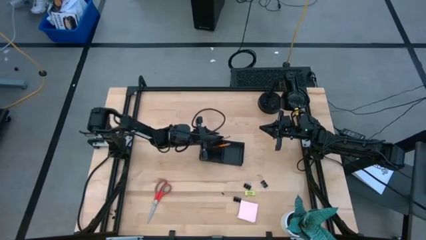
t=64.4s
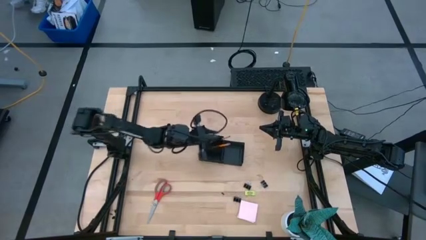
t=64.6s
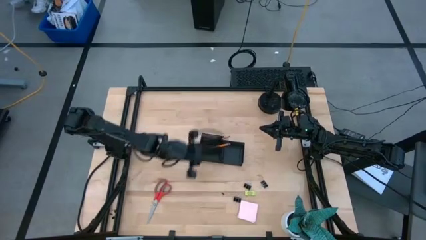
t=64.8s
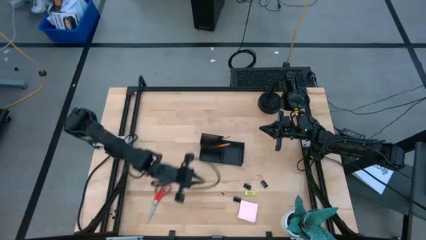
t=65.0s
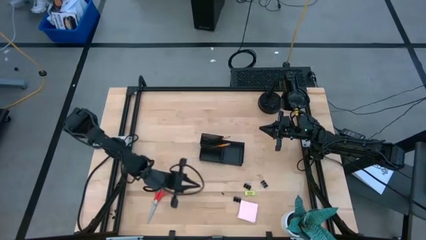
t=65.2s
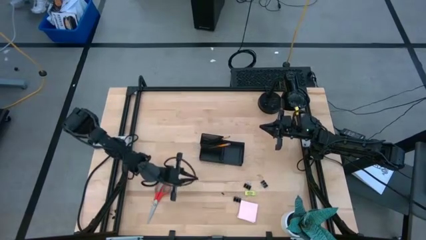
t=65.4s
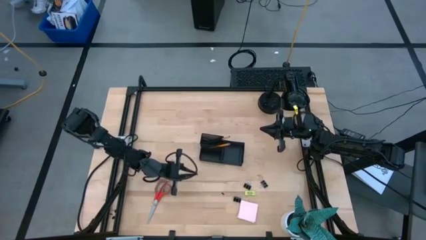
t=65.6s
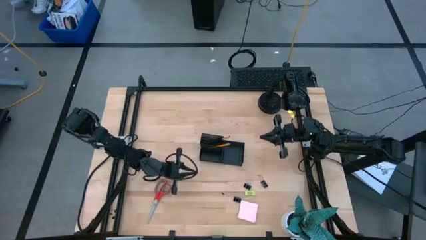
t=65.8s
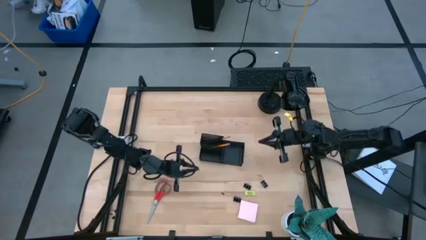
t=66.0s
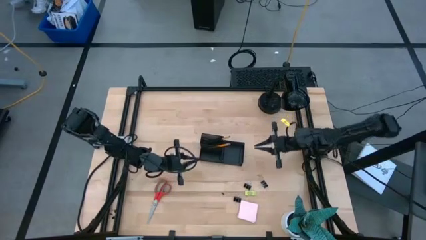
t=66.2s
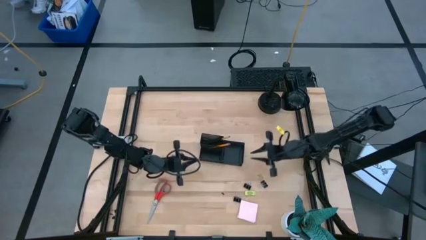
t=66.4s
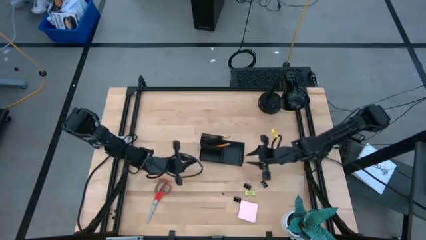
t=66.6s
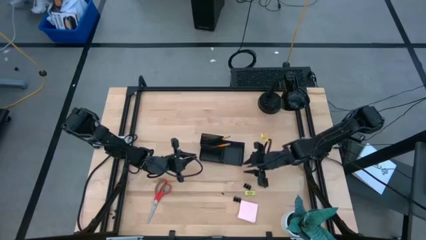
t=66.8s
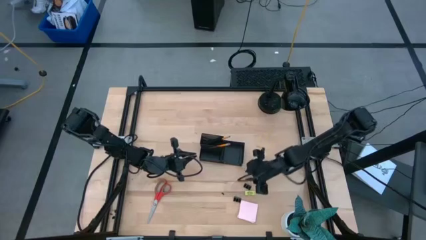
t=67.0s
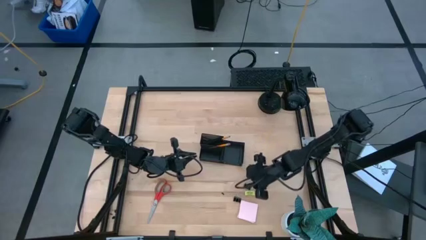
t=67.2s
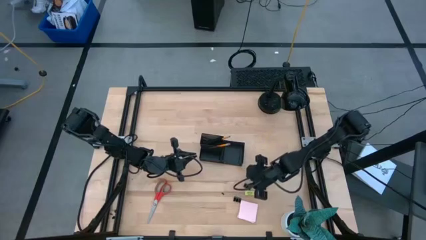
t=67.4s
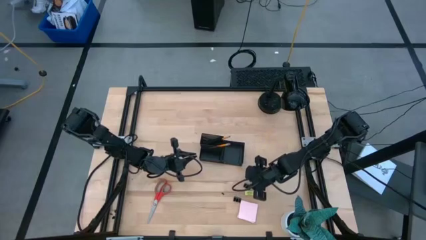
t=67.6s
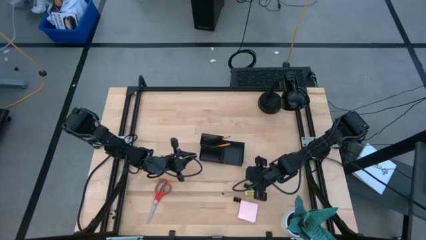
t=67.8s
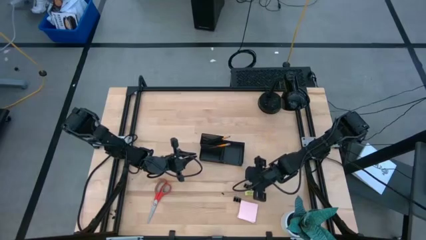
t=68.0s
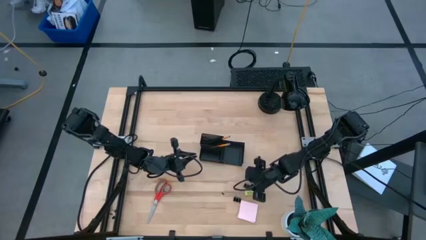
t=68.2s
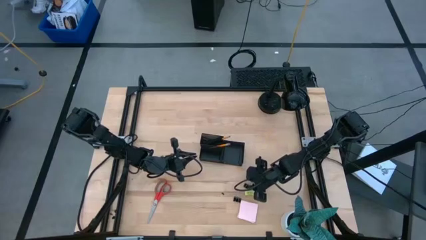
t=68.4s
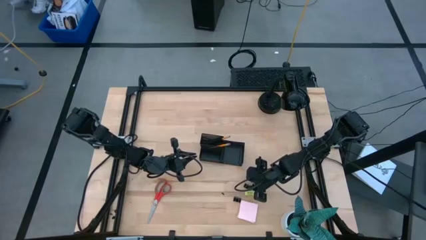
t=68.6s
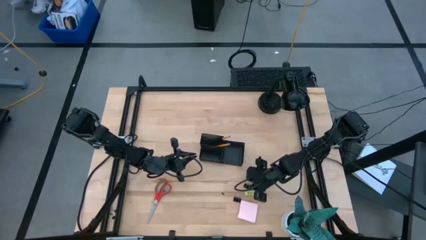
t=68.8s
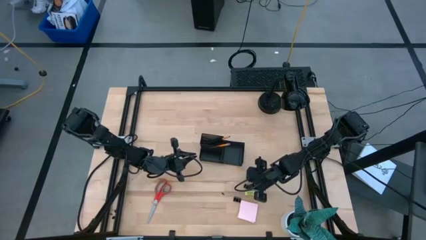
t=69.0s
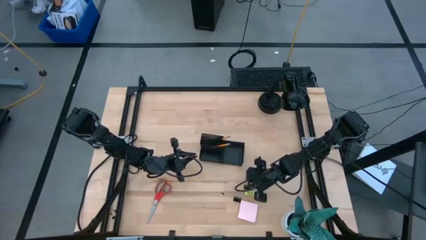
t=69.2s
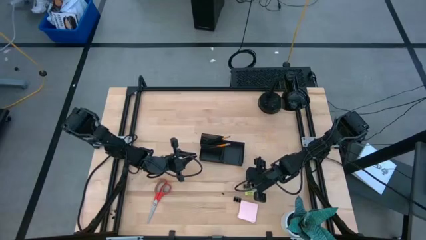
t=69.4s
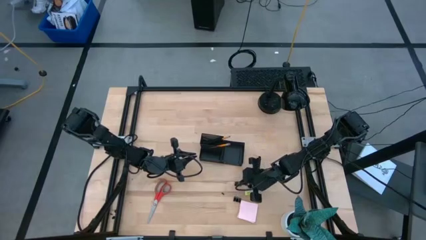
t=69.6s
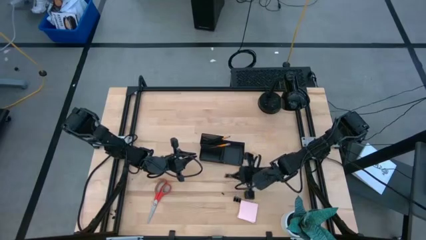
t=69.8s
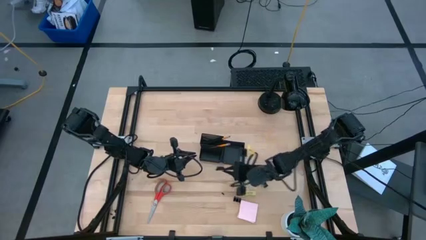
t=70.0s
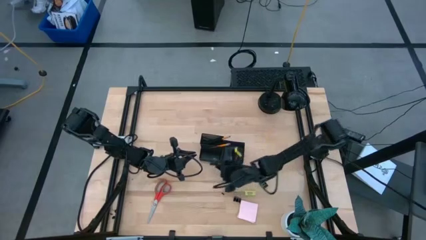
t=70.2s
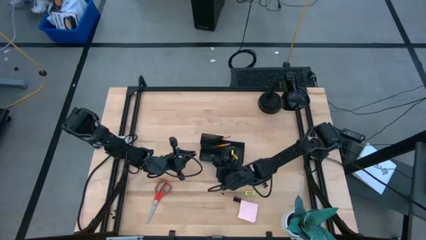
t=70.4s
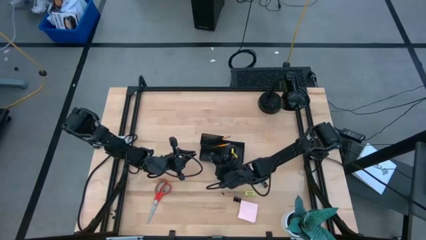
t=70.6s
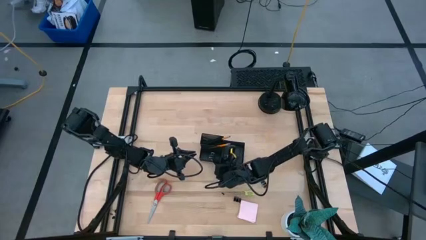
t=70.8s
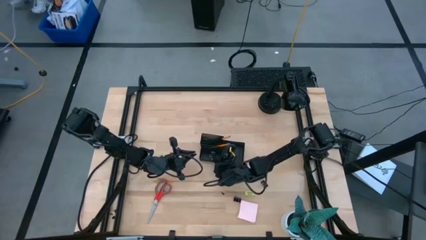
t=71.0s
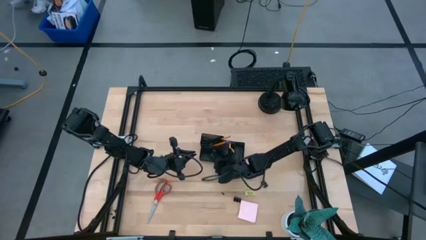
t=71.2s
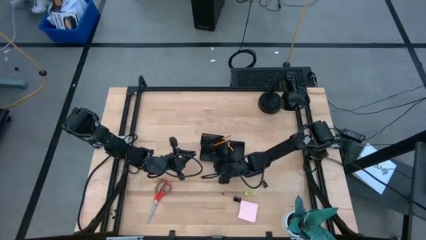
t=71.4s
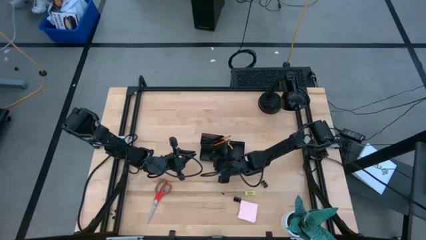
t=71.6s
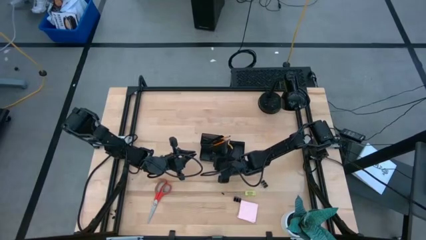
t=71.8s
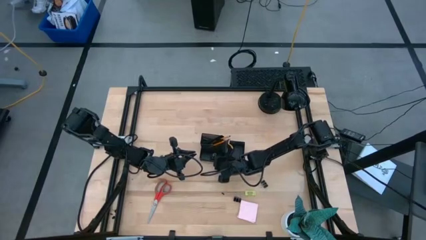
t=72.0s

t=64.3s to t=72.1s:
Task: Pick and place office supplies into organizer
Put the middle binder clip into the bottom left section of the desk organizer

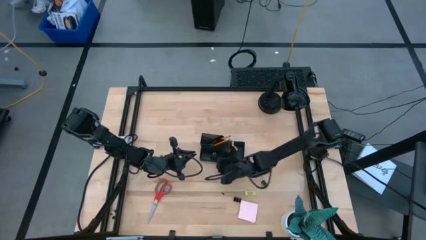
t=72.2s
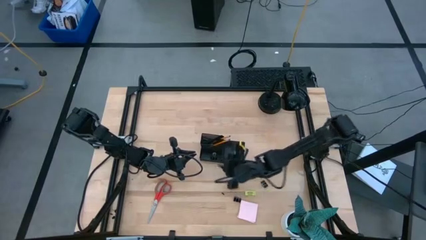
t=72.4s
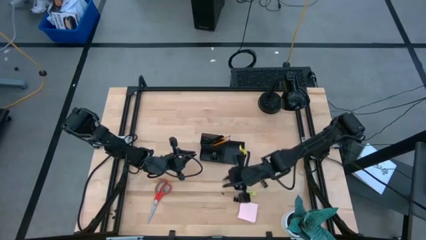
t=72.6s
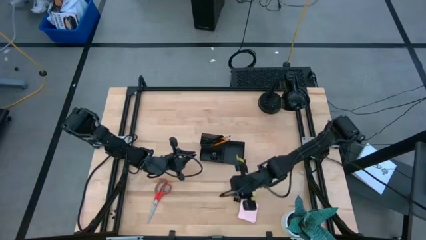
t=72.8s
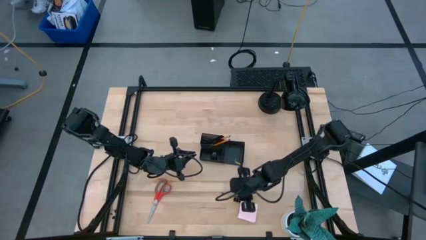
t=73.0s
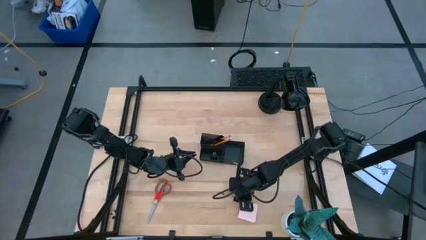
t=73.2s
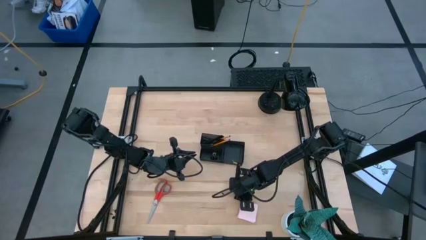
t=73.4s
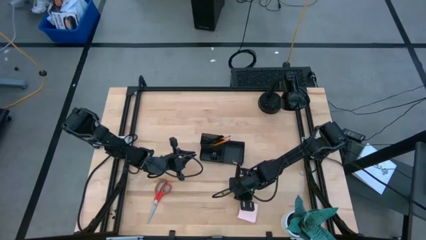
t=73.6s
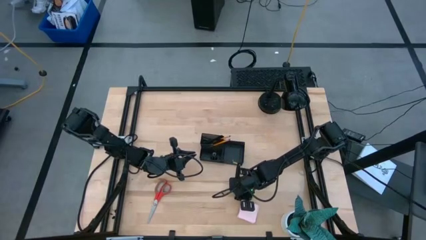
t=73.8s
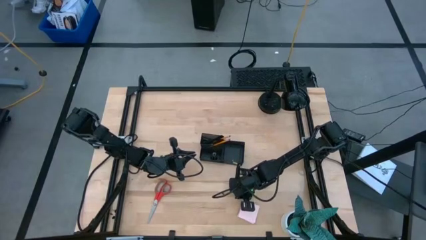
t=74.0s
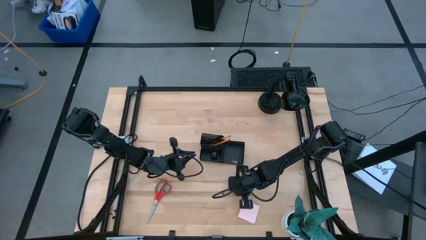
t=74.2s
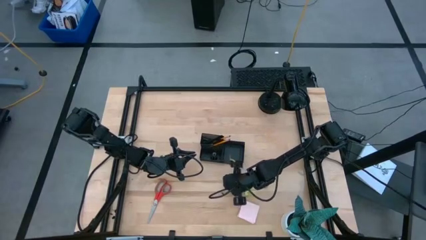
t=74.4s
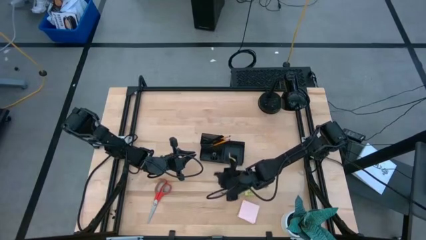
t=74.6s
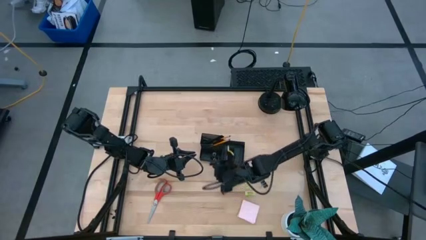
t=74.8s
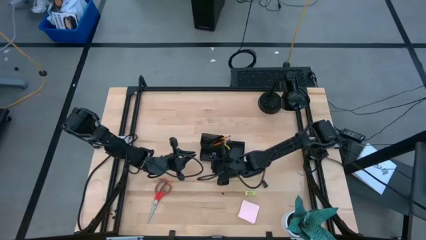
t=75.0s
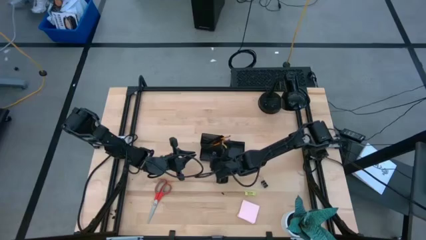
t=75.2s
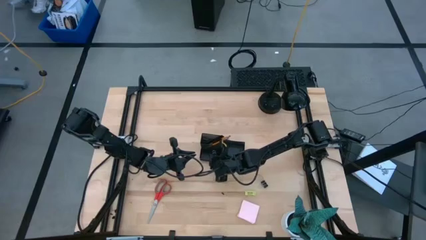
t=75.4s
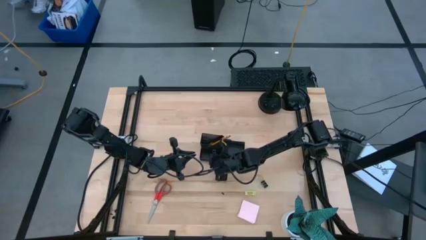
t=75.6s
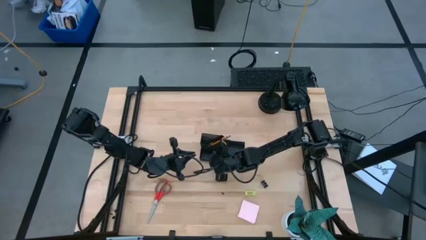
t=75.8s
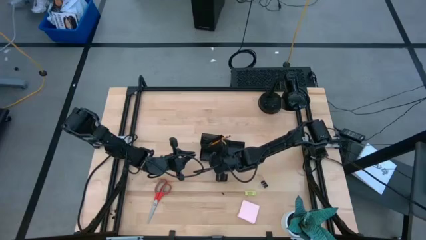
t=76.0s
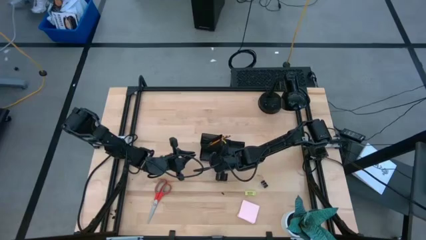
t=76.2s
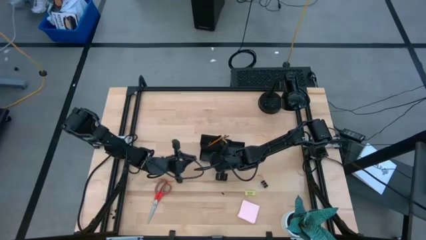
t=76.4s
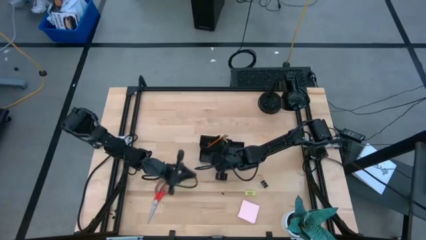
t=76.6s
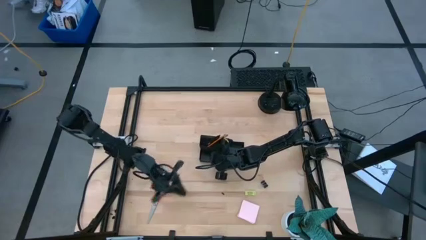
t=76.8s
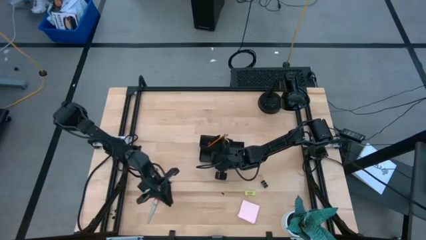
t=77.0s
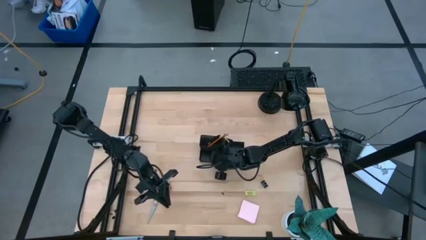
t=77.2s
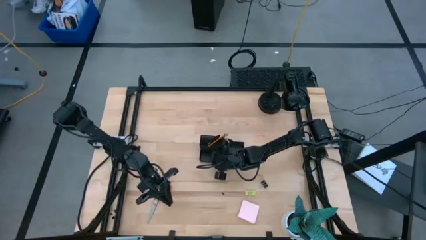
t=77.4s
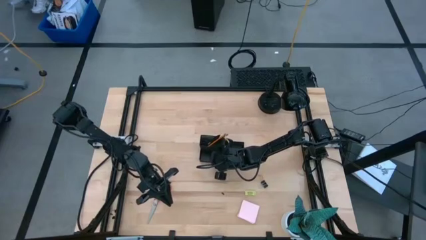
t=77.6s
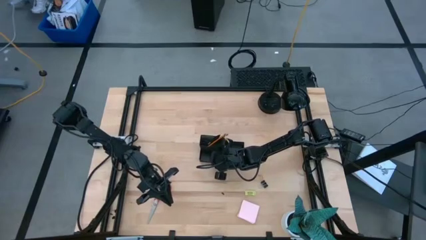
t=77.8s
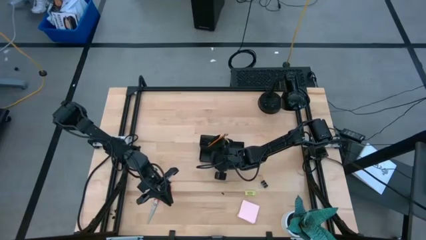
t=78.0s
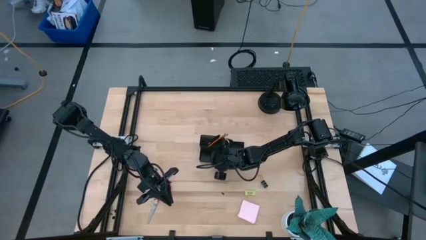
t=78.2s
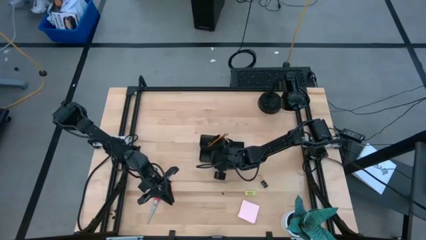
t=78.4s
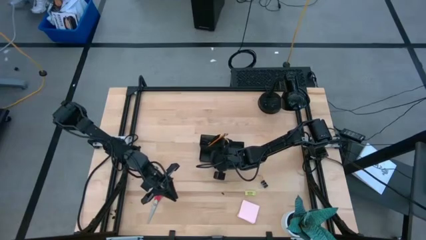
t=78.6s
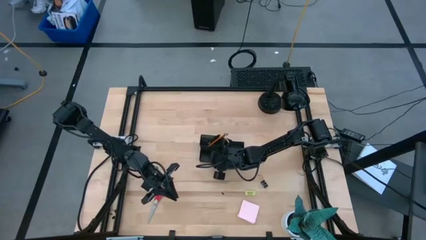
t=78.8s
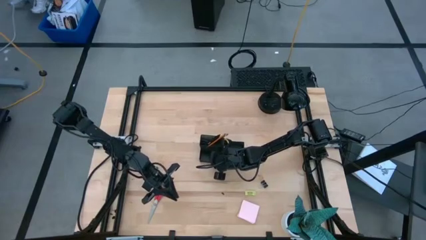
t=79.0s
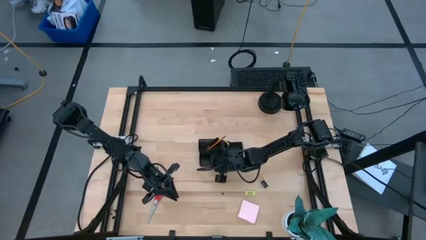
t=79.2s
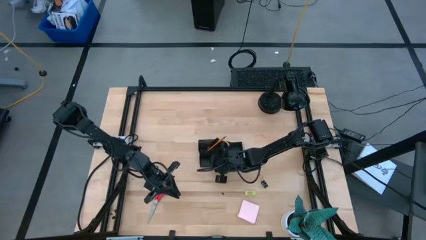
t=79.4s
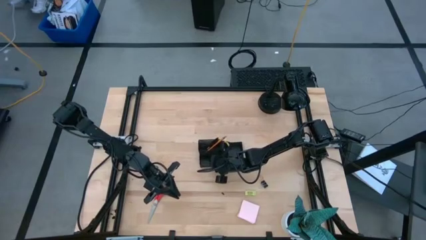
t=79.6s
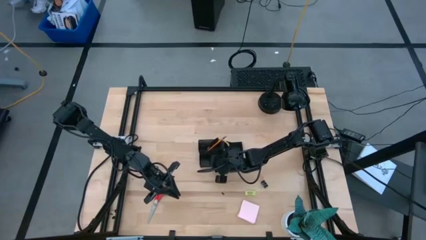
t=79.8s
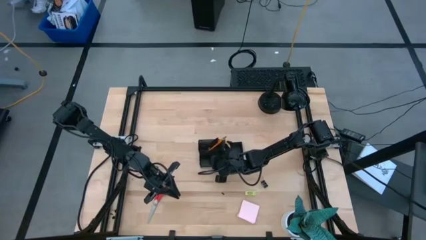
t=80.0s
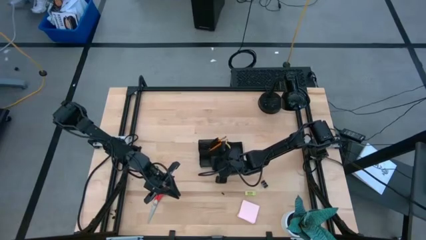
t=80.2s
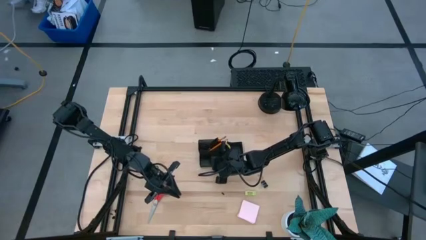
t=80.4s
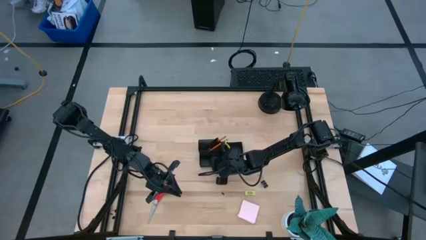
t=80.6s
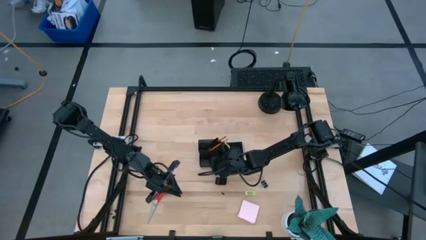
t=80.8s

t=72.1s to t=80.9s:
Put the left binder clip into the bottom left section of the desk organizer
